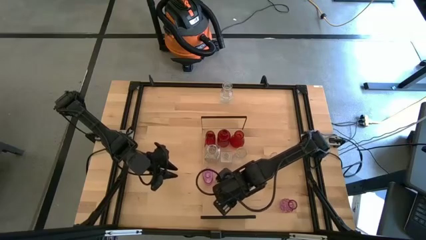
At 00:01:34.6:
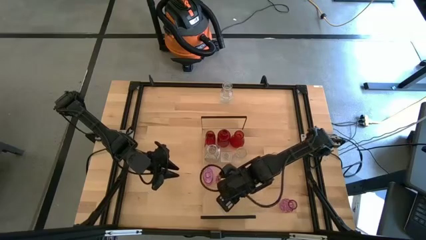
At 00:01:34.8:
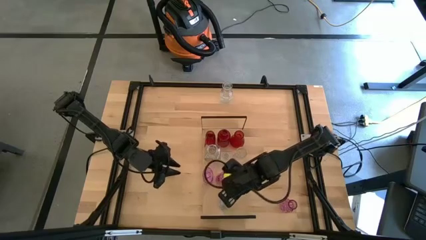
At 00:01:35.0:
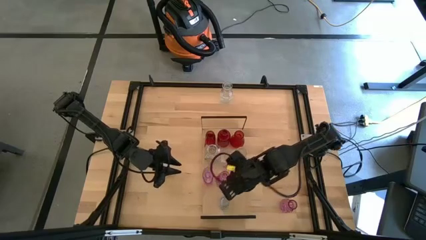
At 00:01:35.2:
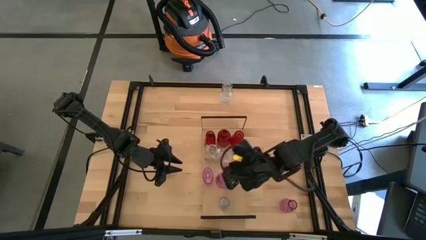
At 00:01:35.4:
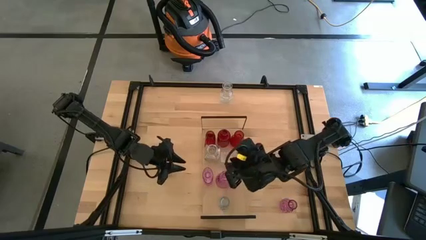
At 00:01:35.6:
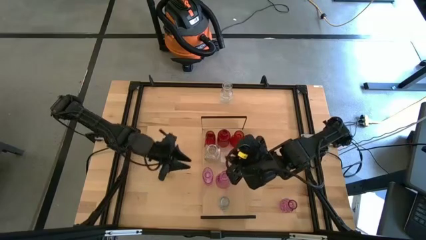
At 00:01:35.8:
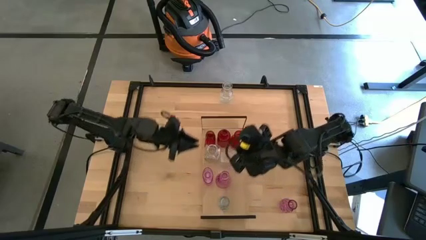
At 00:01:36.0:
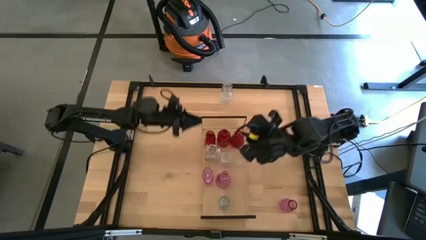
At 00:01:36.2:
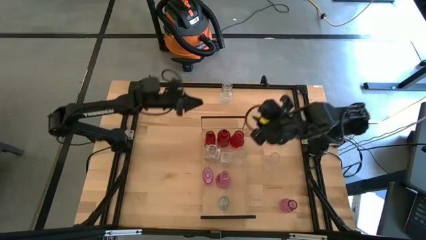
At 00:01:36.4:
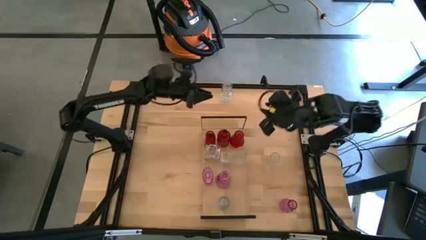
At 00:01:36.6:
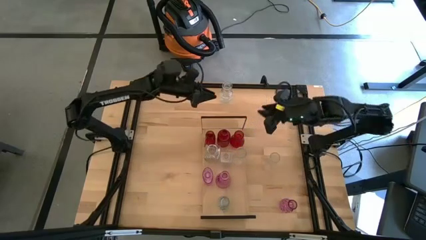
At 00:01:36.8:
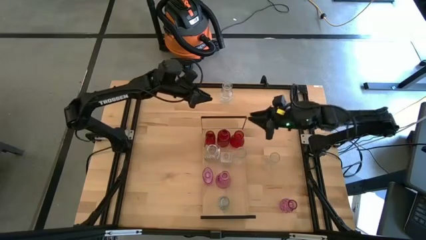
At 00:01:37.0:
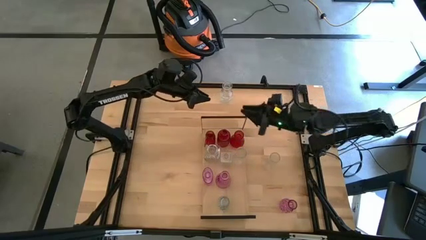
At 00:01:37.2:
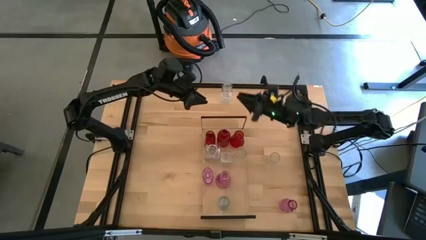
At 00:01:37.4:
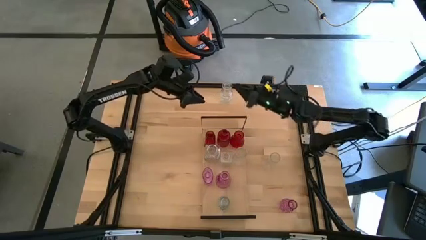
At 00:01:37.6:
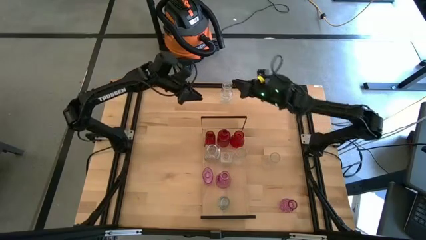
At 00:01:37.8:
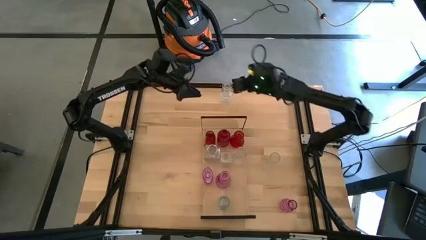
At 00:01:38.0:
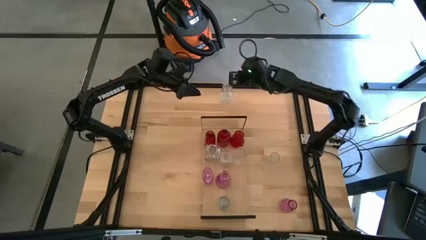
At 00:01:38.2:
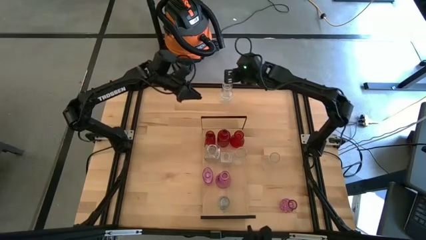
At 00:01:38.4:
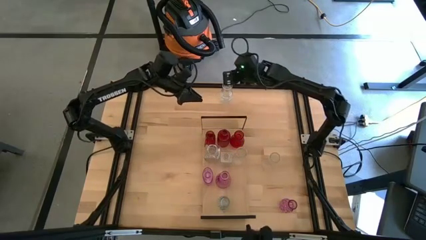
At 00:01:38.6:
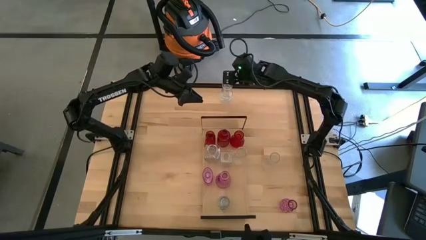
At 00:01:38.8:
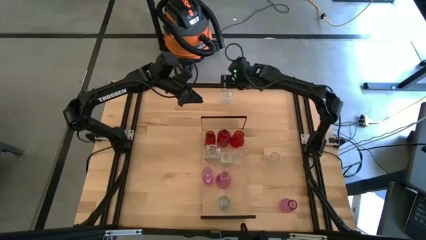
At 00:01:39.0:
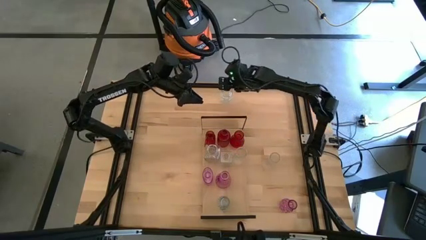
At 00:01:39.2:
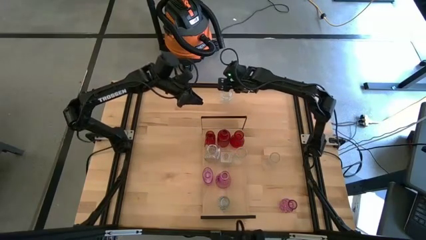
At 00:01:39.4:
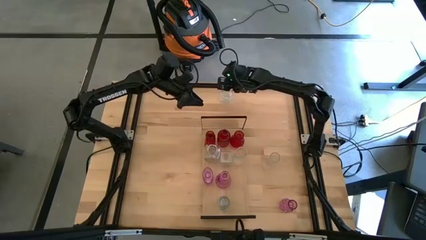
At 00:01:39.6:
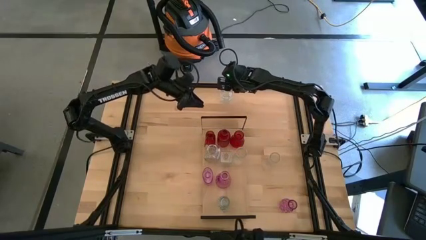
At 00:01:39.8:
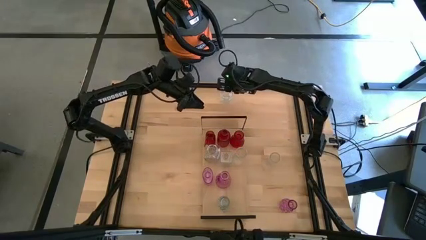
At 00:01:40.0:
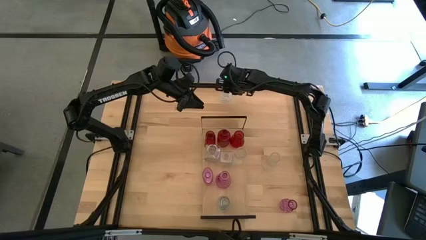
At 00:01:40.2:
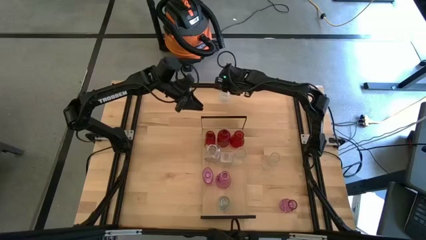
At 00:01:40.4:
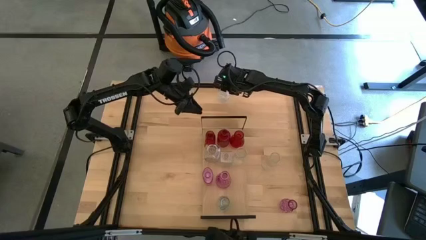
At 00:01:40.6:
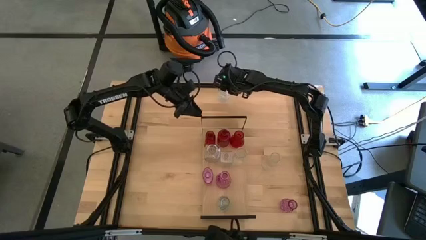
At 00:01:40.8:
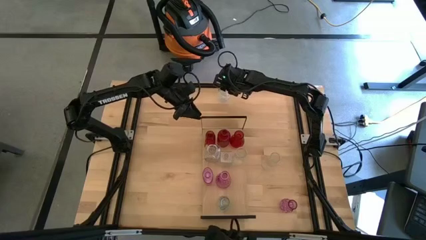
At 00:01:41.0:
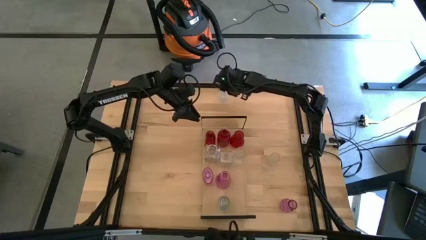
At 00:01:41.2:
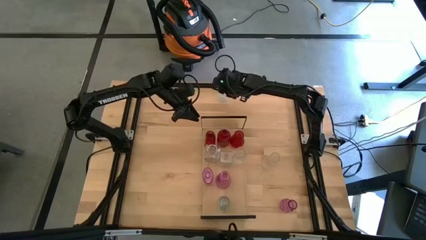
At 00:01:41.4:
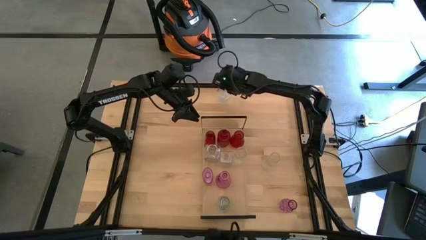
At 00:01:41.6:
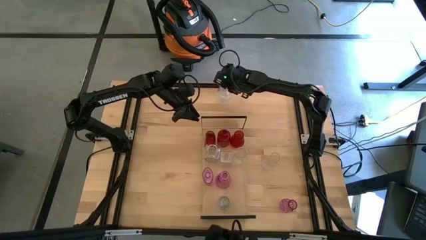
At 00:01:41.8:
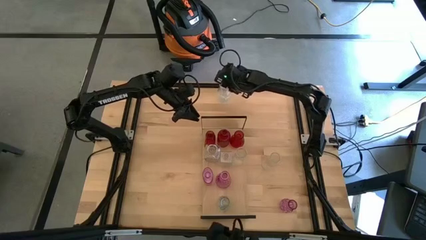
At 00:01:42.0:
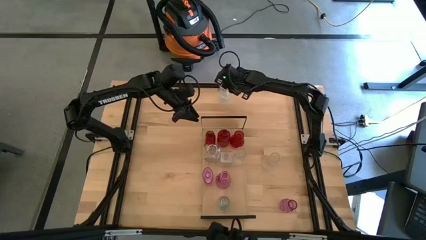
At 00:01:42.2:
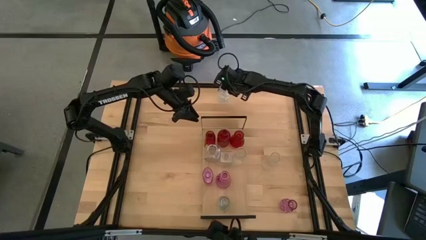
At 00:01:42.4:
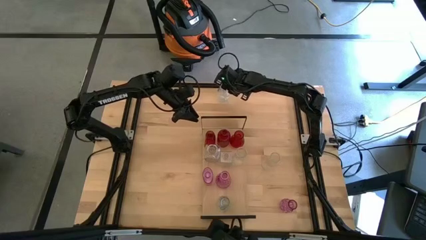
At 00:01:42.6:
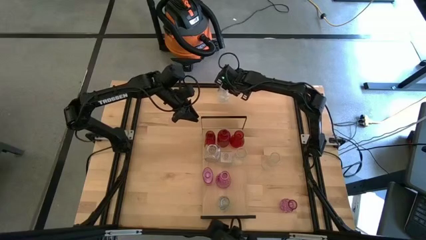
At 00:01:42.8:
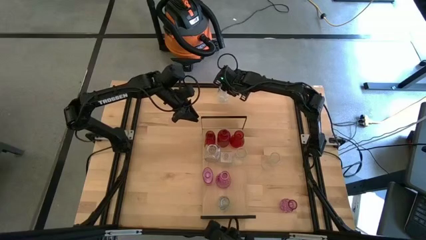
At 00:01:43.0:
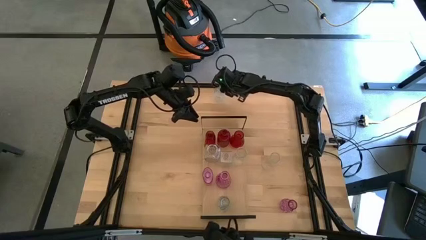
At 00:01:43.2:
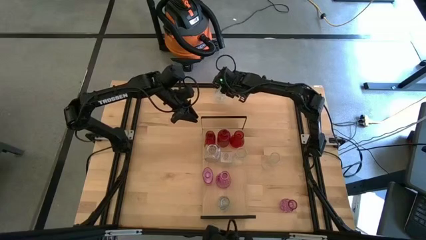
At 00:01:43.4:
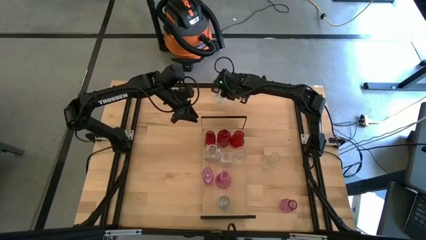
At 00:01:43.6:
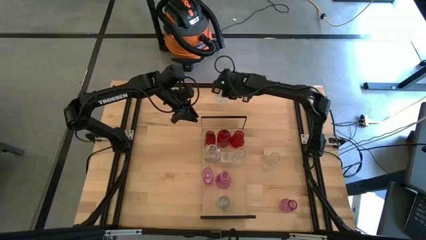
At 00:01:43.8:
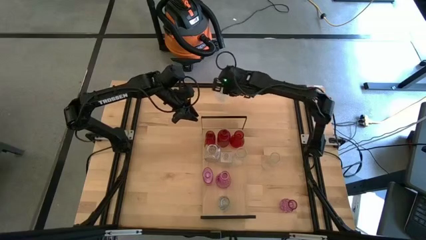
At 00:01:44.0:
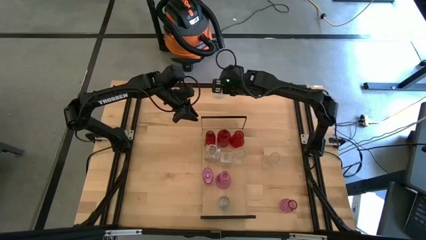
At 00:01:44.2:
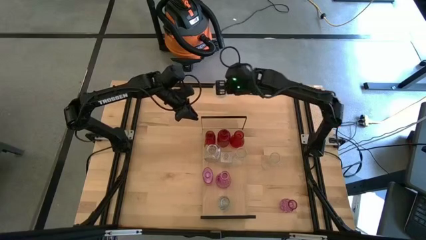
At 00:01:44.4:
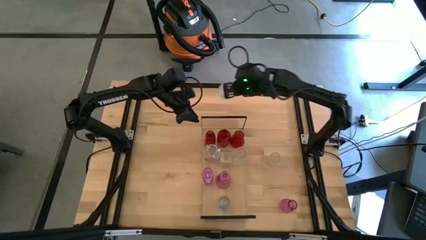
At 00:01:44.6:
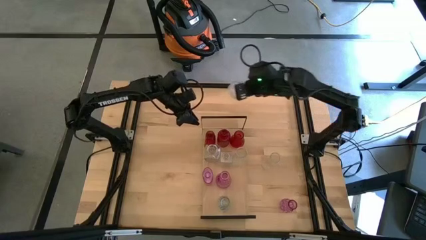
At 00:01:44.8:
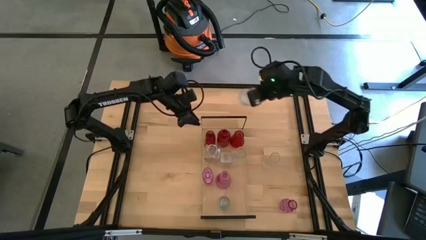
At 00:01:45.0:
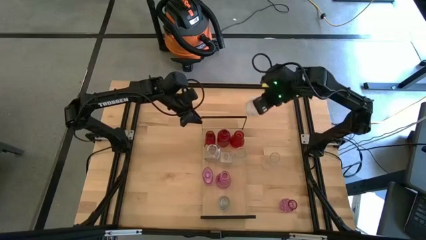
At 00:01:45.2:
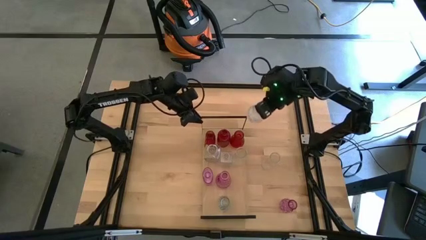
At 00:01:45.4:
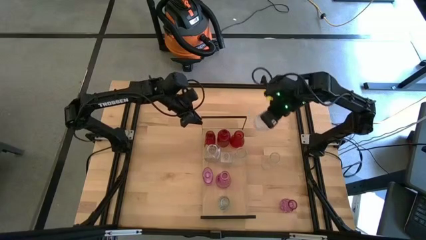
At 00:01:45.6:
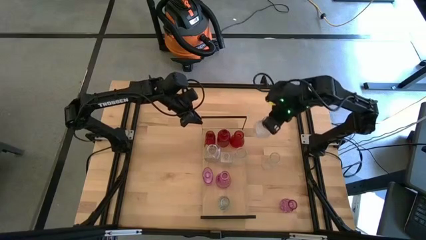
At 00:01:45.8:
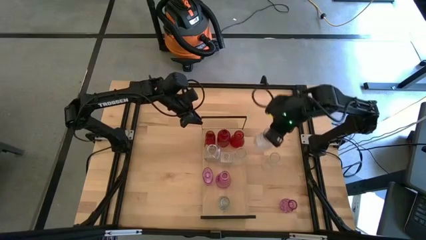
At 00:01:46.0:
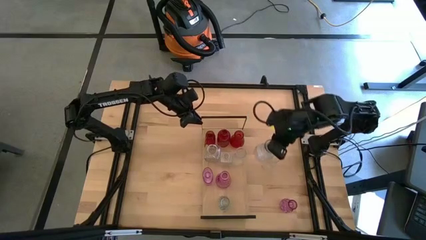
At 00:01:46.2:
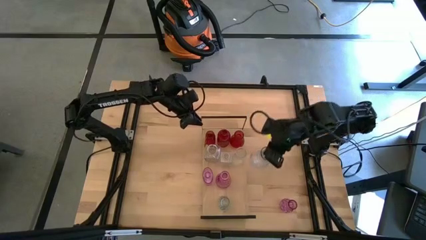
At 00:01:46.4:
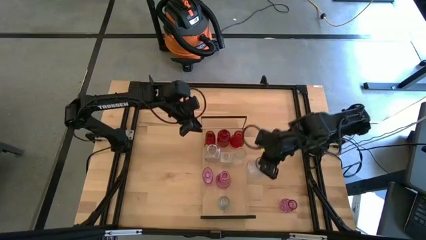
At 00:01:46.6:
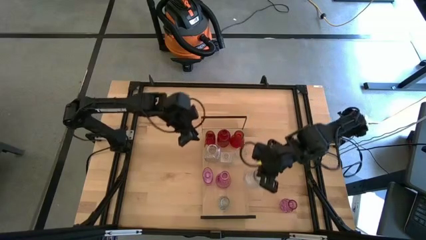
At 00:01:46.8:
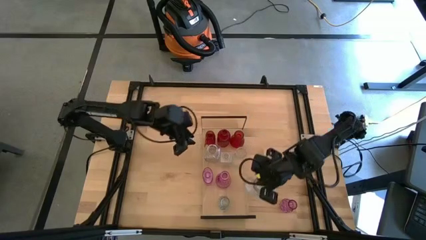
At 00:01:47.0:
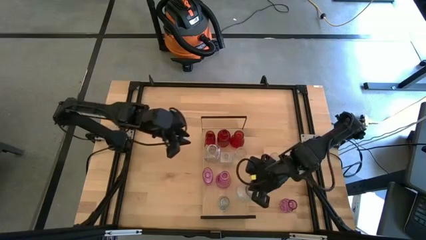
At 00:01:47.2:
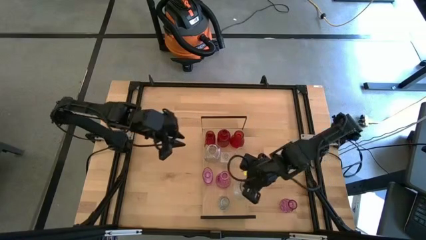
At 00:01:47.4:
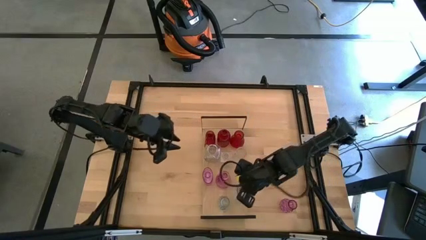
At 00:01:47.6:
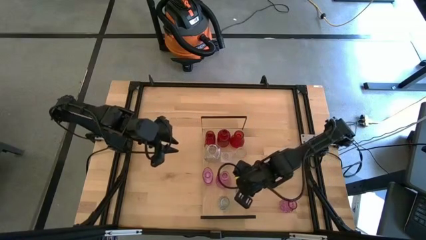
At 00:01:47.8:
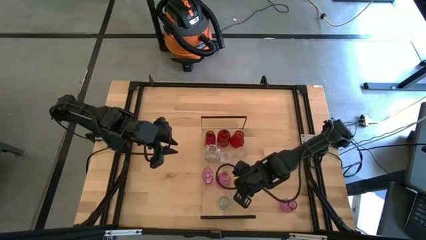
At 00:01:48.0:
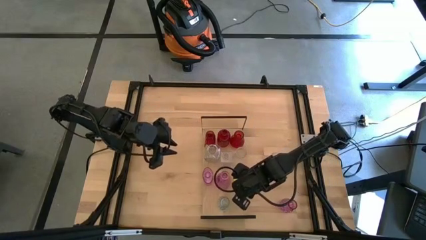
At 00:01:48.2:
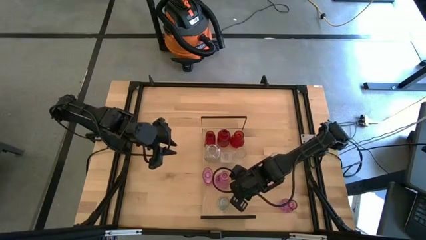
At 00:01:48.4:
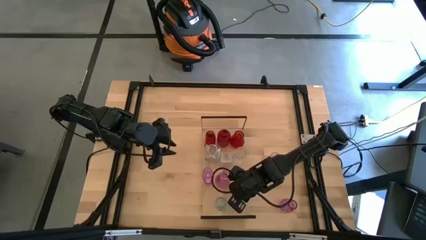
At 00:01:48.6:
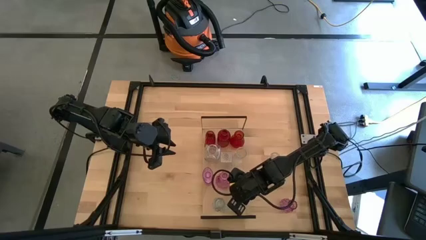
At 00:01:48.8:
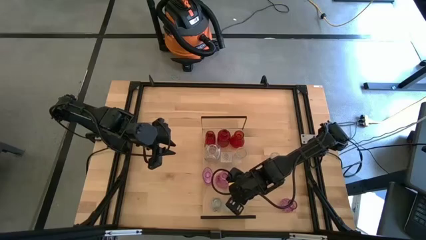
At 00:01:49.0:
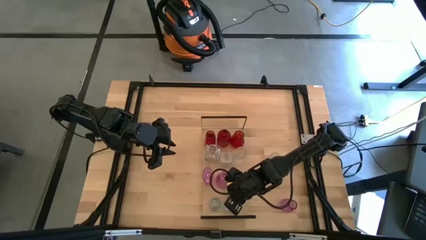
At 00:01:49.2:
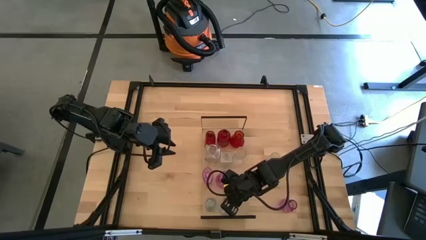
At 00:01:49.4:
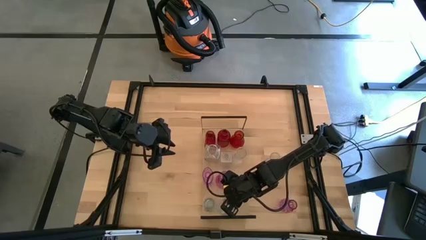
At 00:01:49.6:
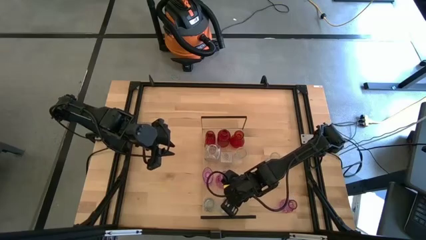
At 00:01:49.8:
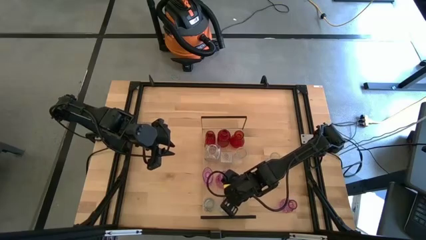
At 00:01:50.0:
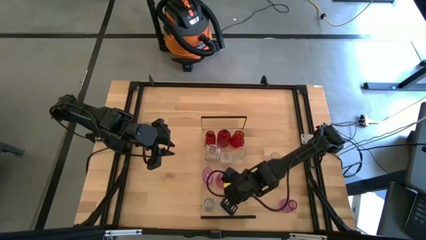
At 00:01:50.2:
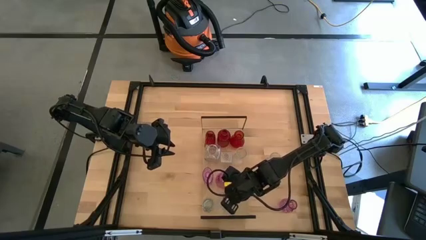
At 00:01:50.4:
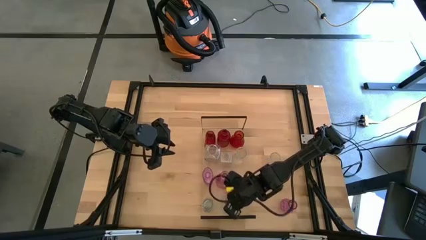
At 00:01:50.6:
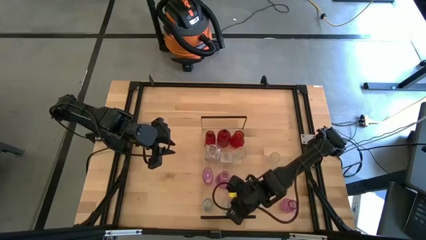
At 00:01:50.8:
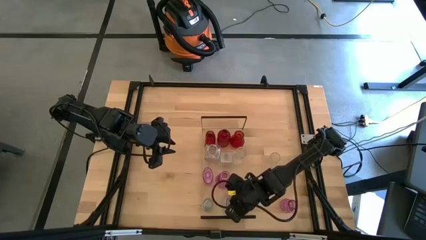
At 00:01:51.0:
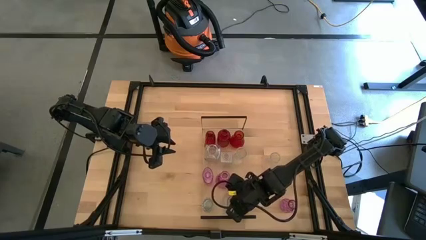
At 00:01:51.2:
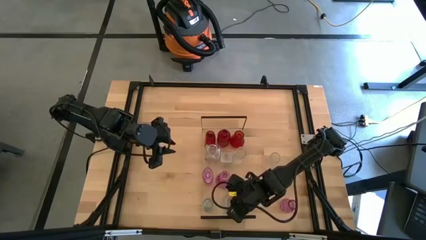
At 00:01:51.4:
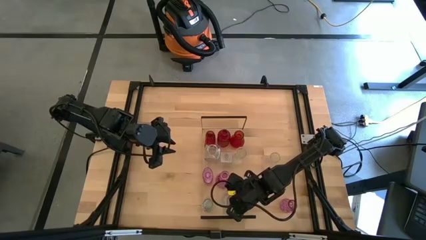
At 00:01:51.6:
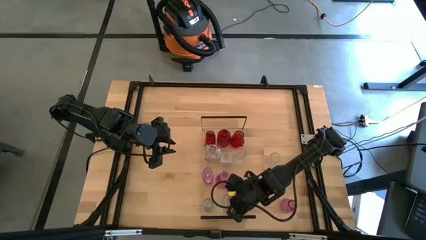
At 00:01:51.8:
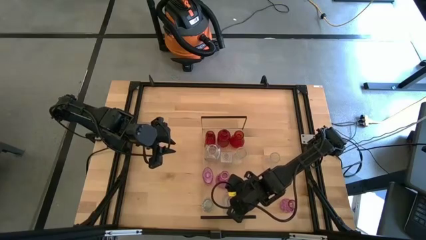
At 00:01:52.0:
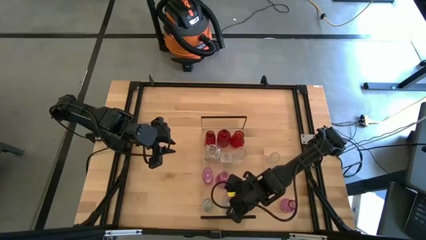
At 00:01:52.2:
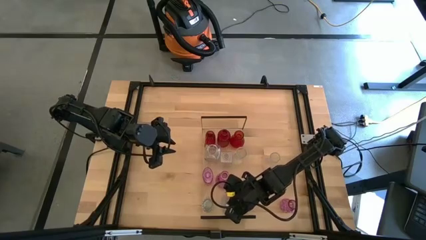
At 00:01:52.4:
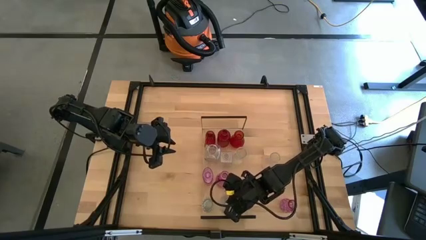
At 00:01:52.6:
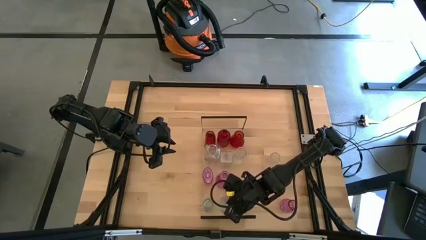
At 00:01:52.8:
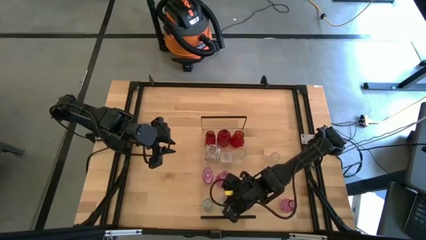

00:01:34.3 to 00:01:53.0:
Task: sort vases onto shelf
Put the transparent vase on the shelf aligned with the other transparent vase
